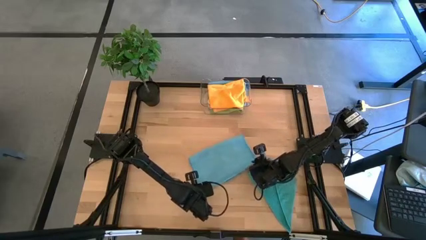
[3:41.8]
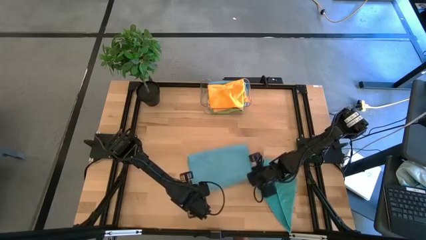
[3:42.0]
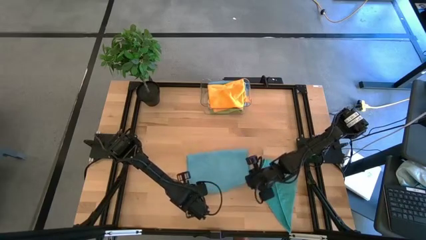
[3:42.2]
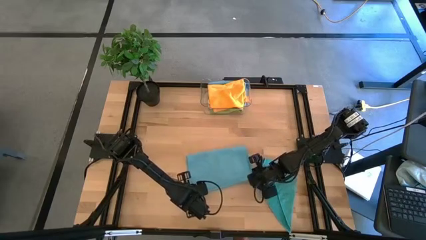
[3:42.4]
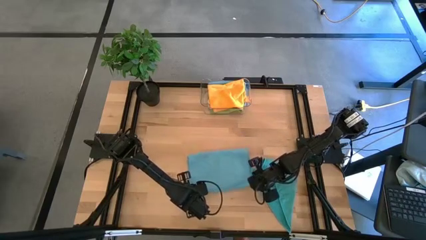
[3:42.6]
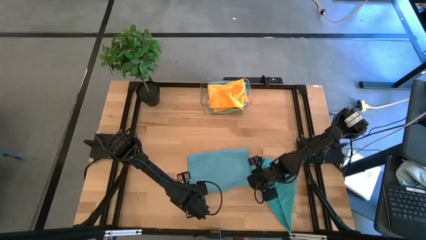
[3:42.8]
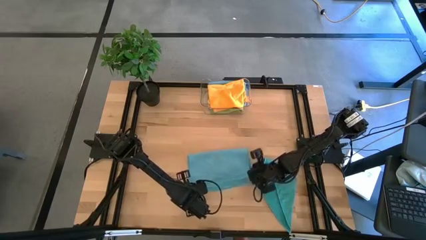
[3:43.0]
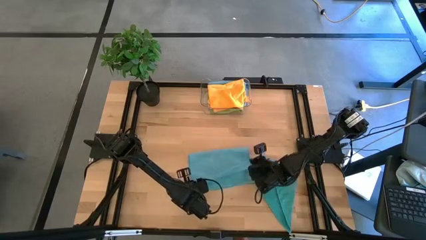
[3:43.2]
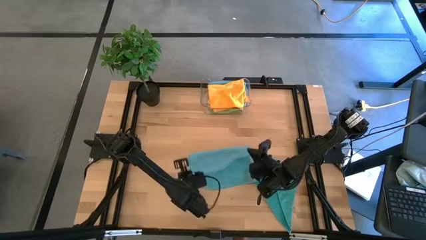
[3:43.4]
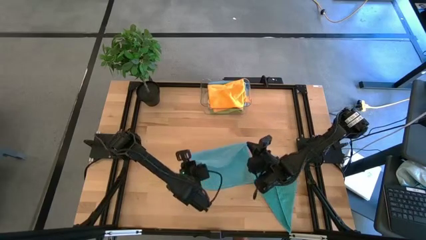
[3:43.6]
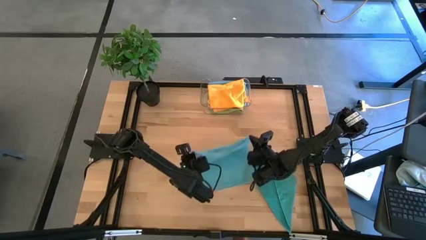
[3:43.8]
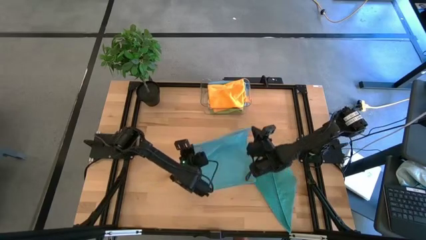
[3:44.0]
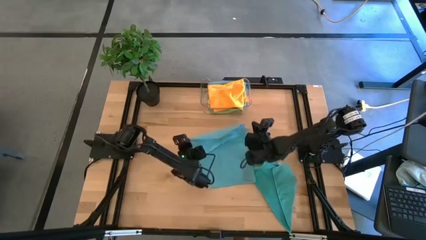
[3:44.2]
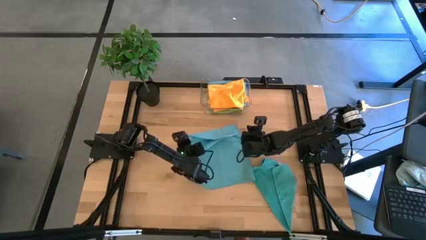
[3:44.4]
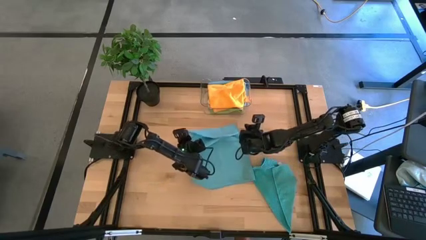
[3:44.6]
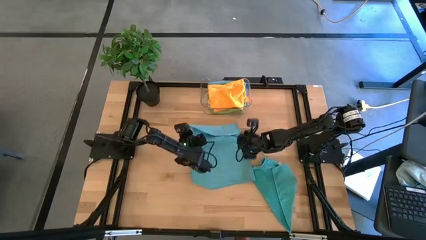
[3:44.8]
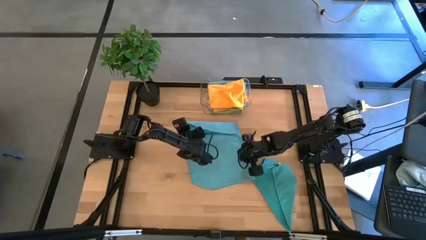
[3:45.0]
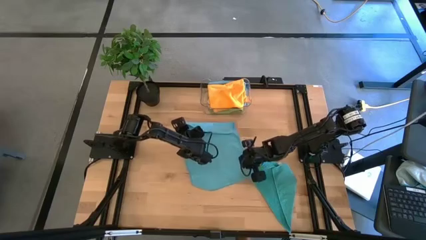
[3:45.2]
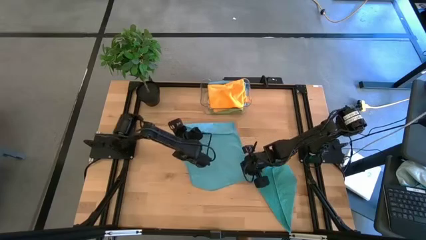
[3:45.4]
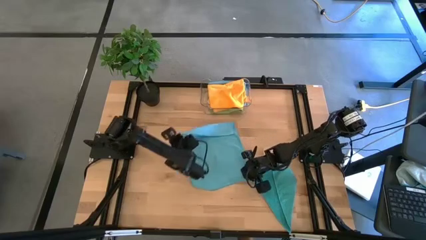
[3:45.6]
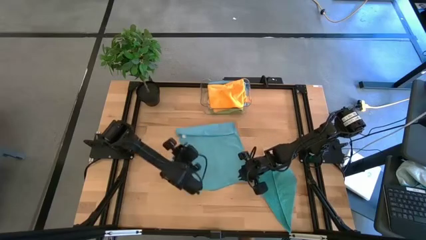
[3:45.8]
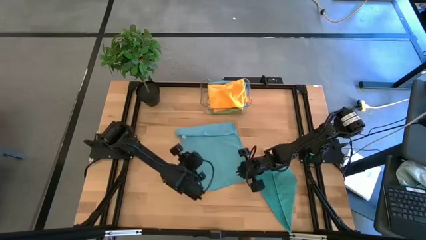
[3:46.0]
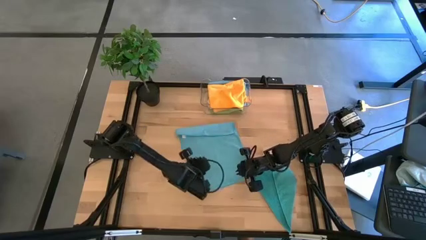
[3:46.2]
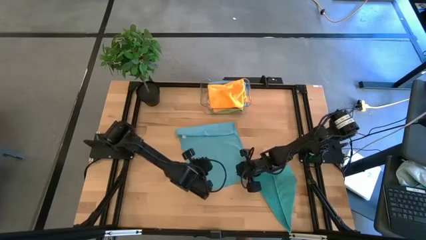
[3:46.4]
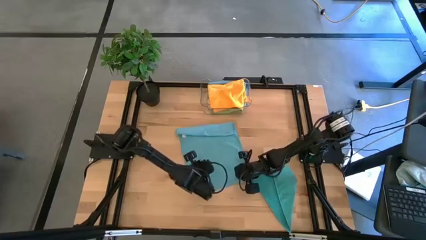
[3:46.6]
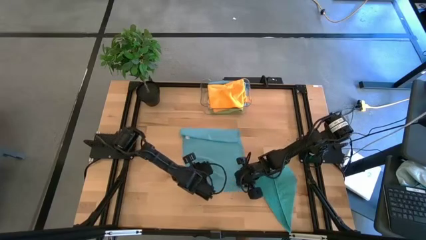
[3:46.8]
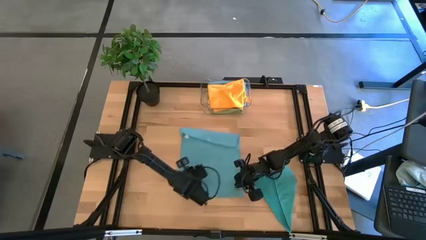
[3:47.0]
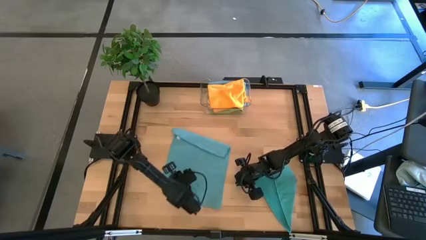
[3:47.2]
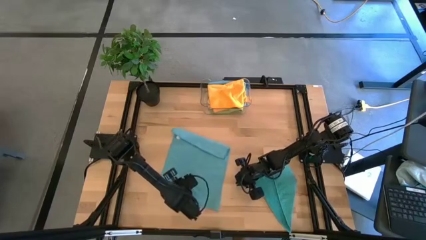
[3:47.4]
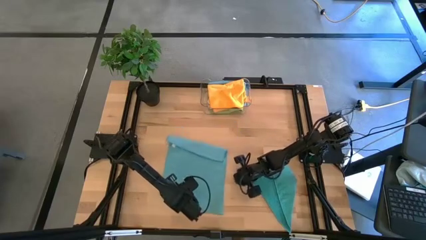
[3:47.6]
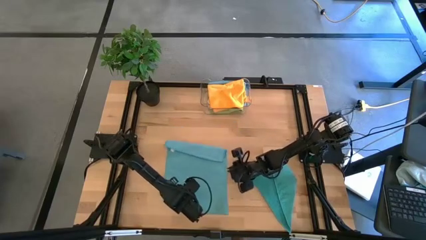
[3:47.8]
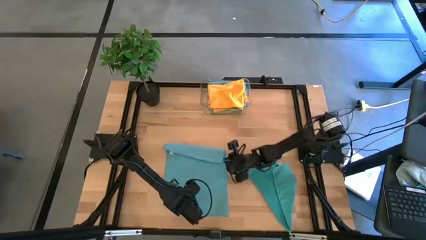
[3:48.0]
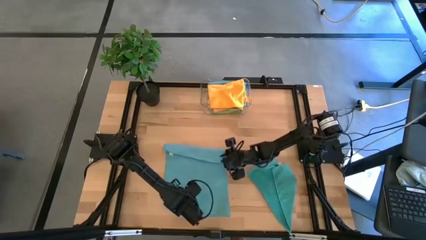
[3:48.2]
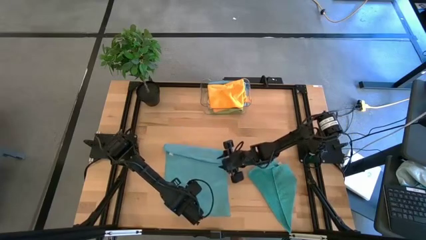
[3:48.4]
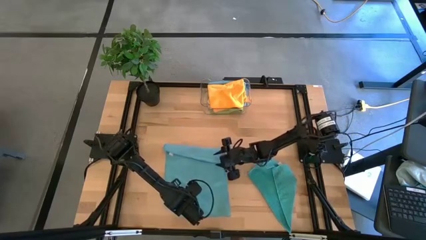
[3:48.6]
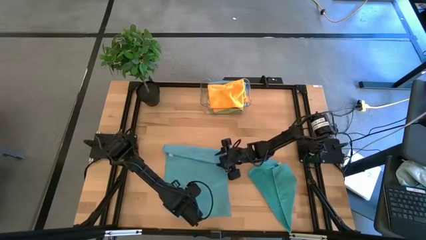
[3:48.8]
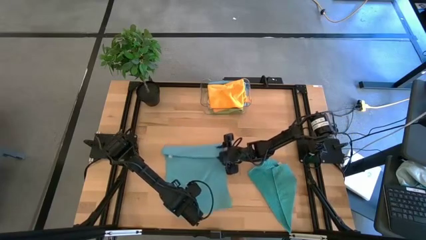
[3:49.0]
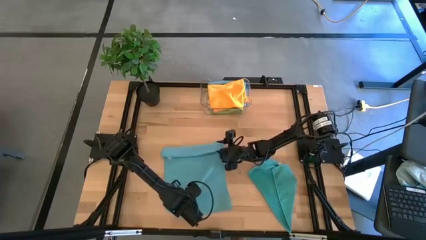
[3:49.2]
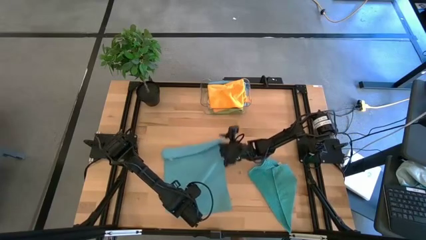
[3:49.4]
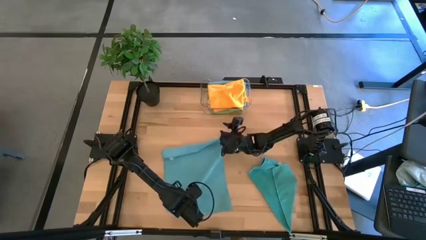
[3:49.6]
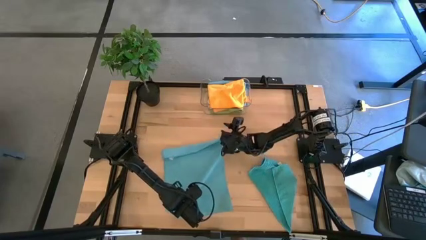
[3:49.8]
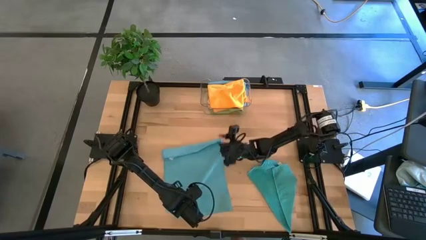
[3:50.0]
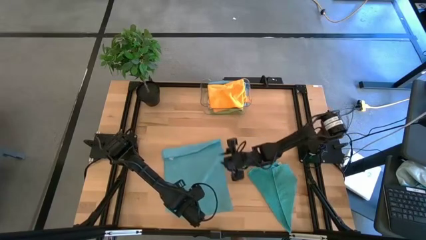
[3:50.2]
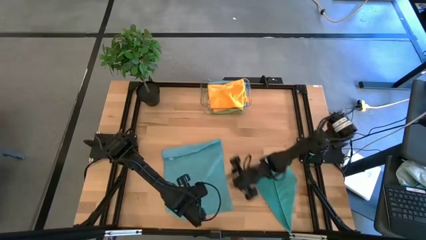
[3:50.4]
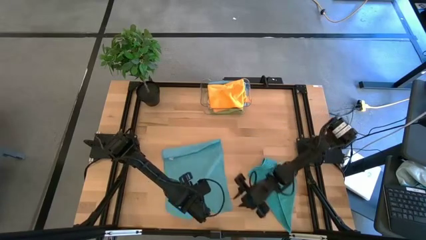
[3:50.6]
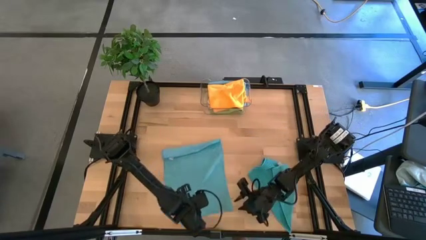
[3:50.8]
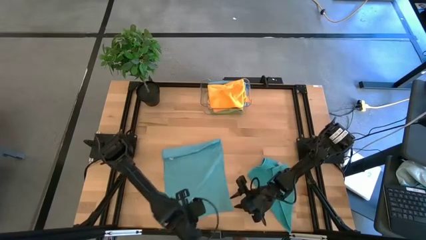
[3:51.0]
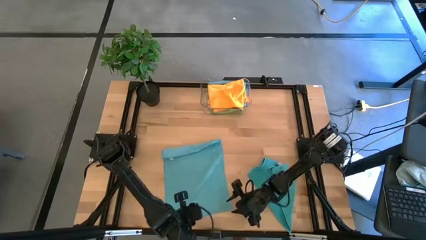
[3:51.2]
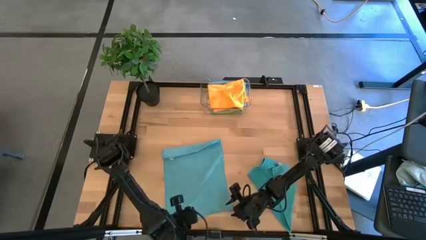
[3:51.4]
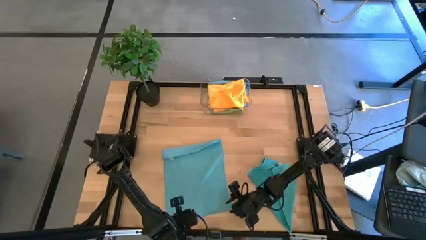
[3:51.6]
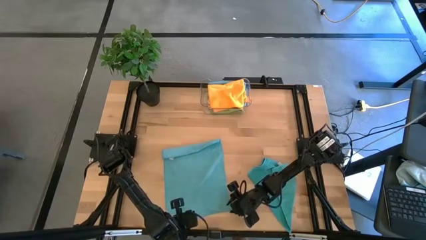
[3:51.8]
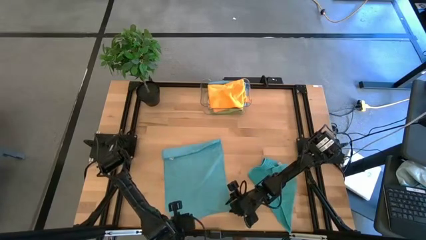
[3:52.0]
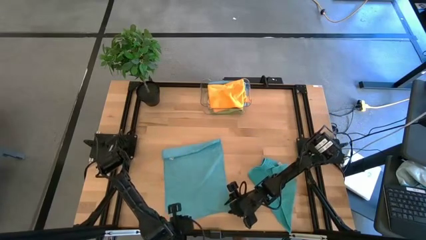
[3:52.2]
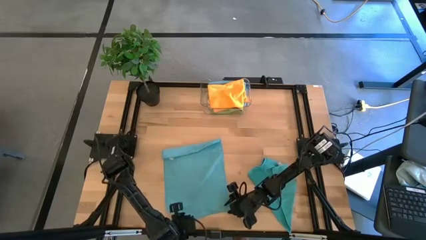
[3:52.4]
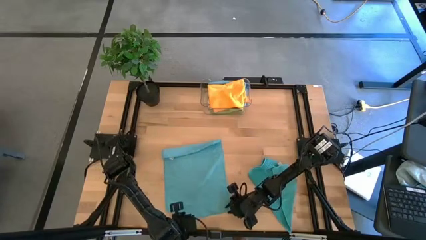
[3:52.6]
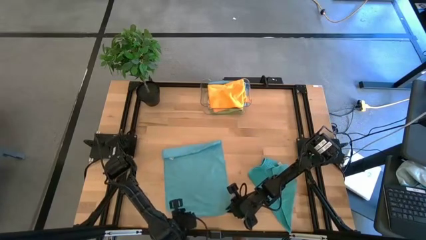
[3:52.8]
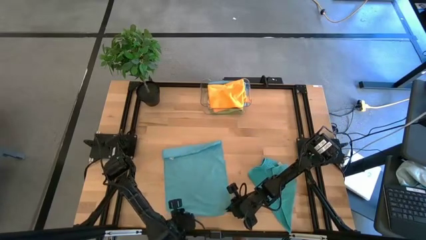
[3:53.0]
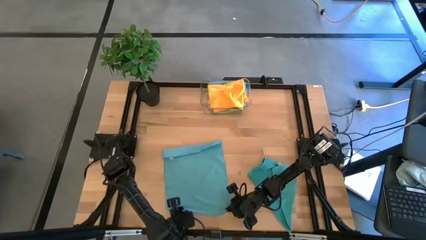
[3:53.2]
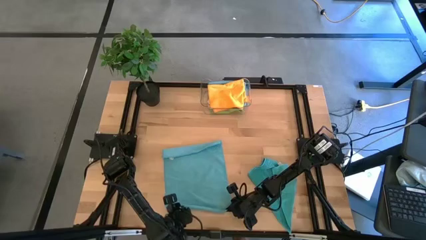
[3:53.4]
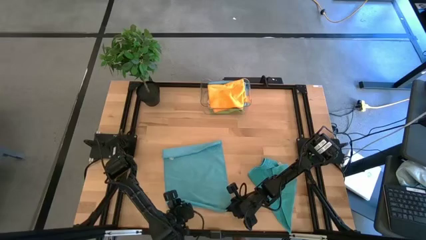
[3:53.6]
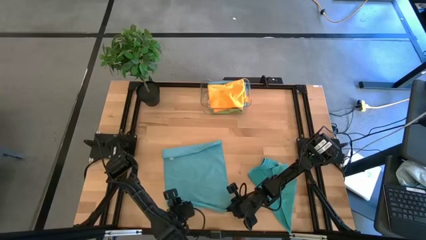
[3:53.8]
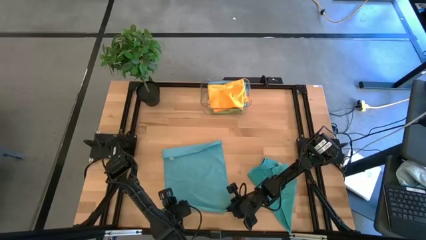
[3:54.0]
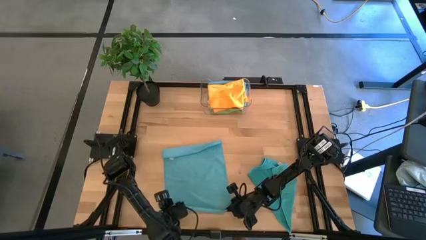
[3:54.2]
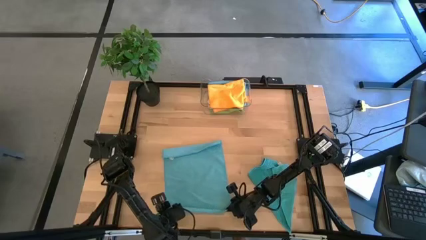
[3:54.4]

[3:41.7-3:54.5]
Task: Fold microfiber towels
Fold the top blue microfiber towel
